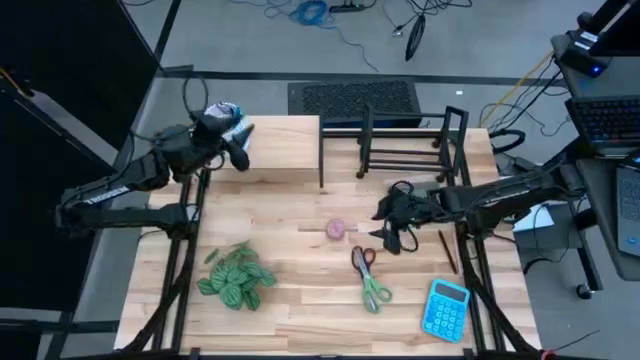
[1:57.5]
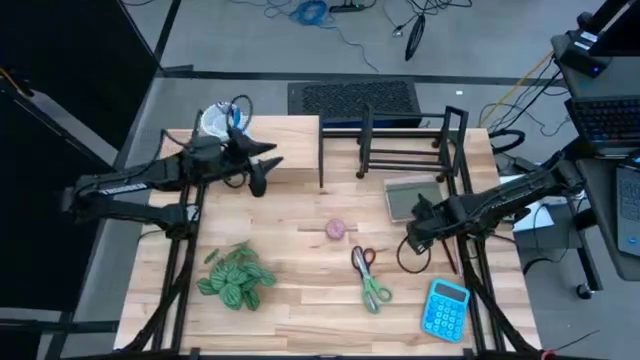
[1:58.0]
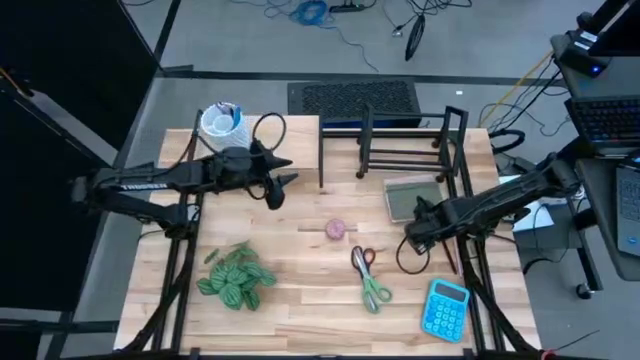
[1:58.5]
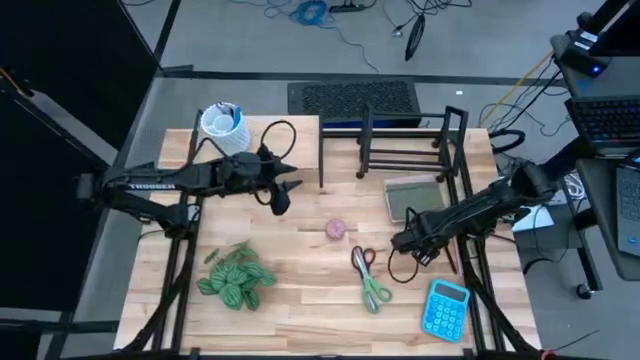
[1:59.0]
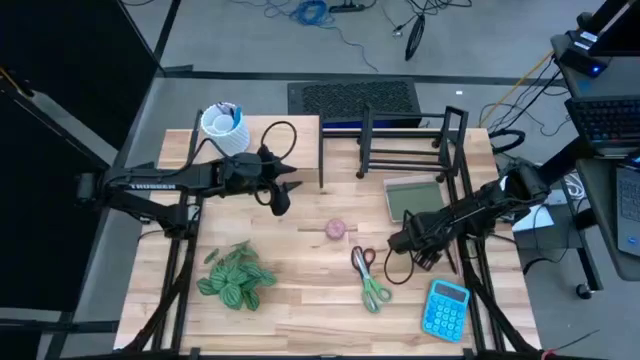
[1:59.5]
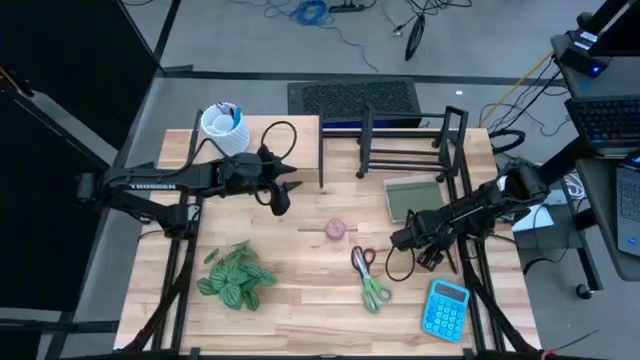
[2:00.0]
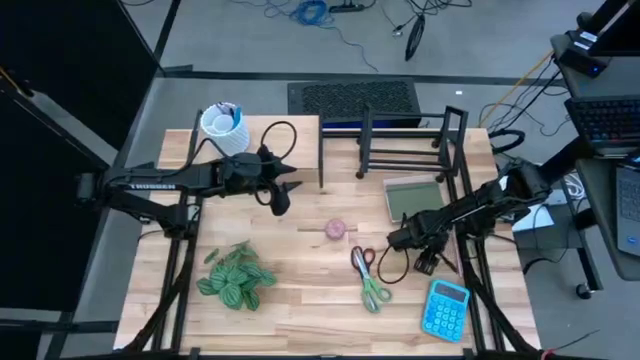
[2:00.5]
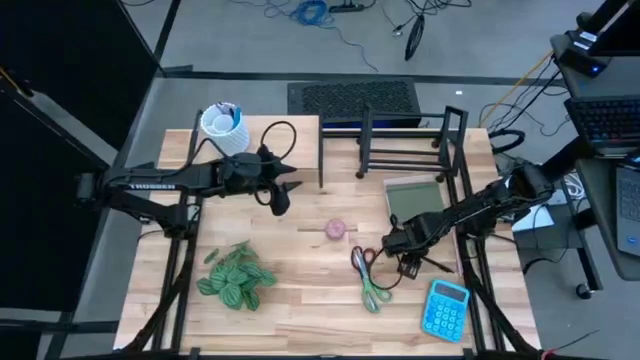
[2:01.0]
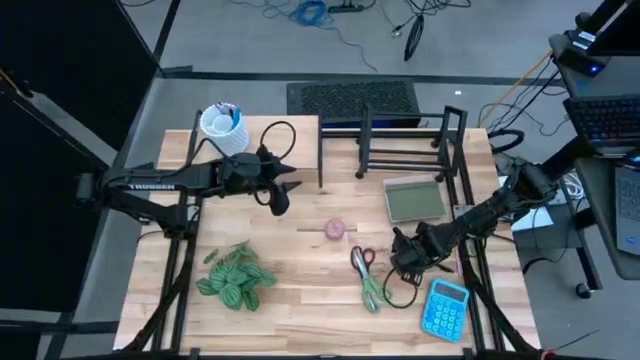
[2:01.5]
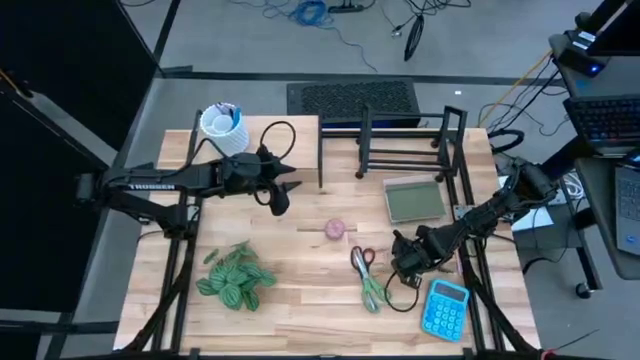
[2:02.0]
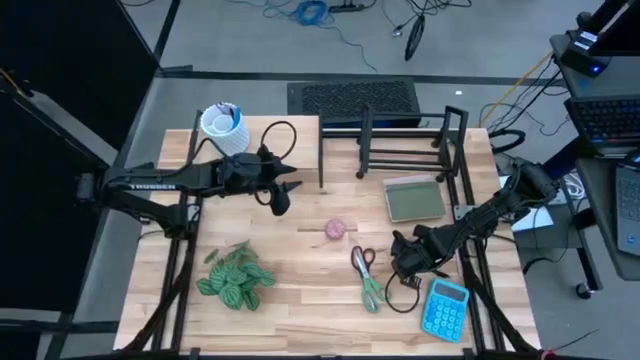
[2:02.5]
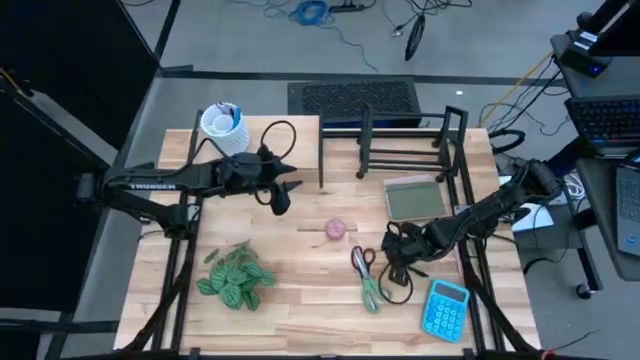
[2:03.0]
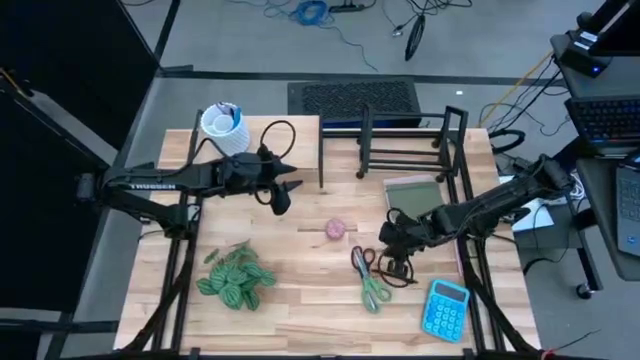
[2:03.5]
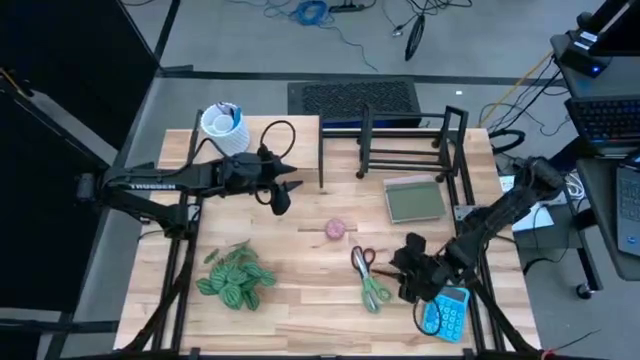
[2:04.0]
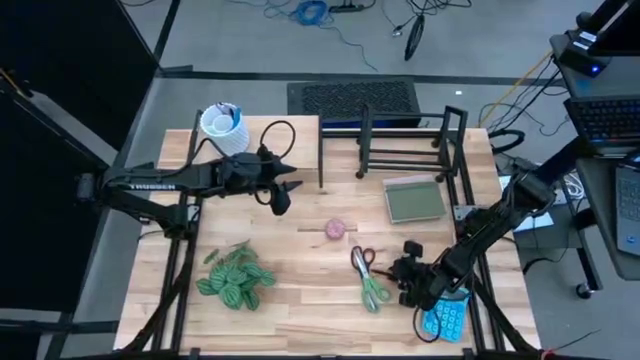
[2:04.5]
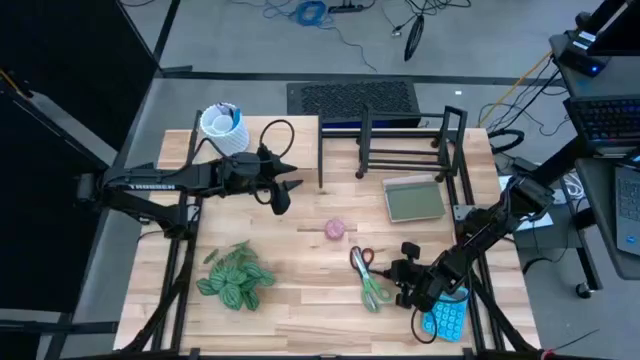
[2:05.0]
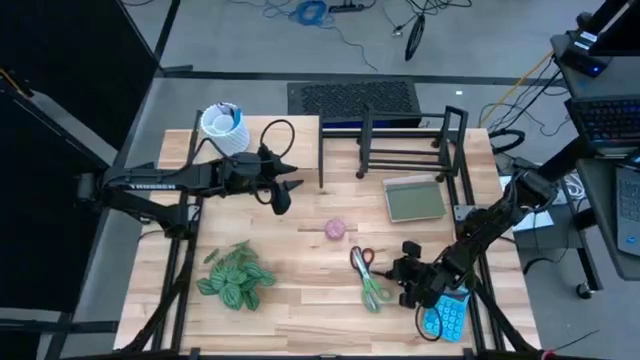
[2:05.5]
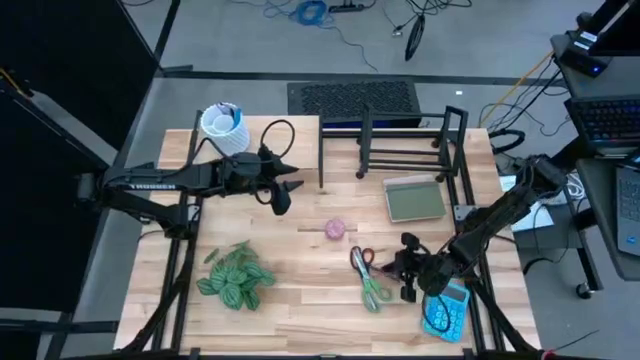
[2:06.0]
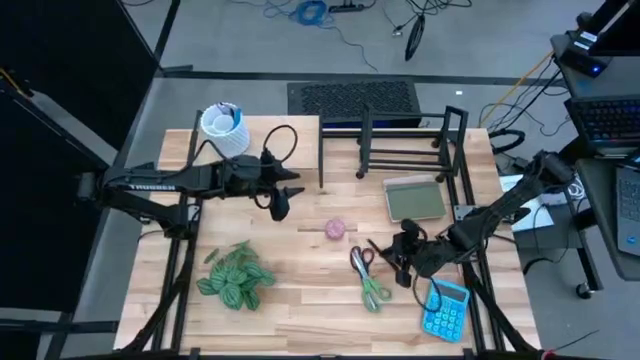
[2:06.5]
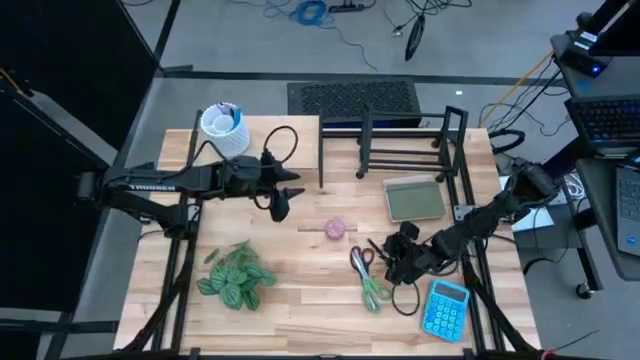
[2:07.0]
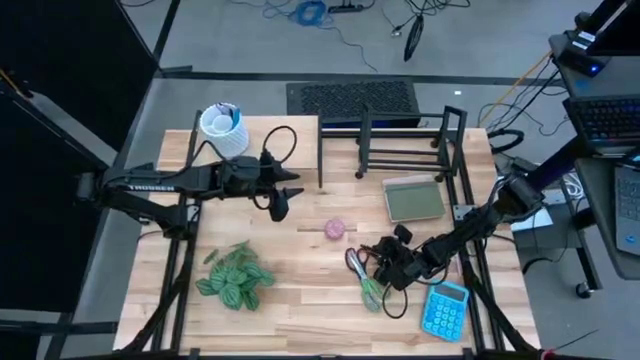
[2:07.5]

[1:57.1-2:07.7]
Task: Stock shelves
Put the black pen into the white pen holder

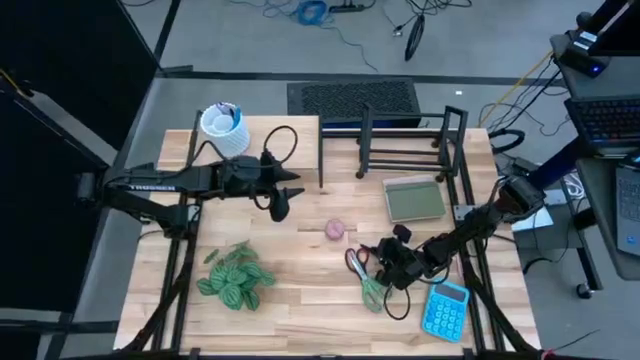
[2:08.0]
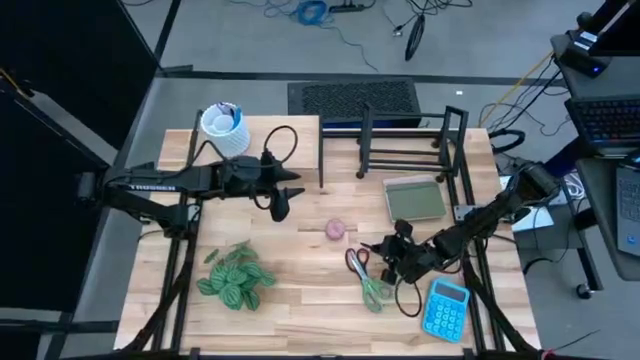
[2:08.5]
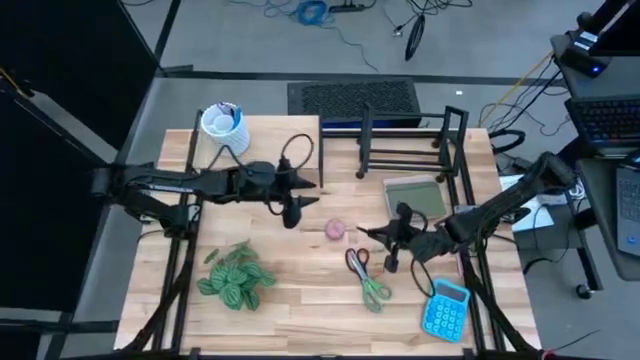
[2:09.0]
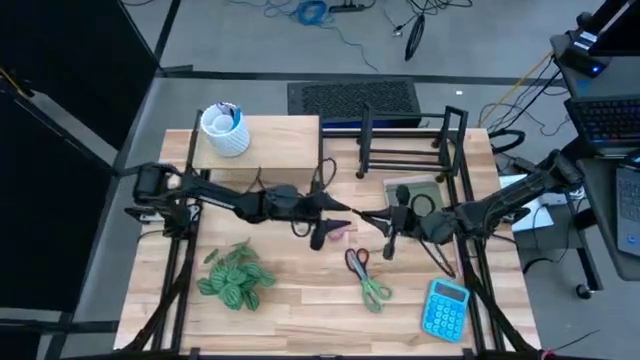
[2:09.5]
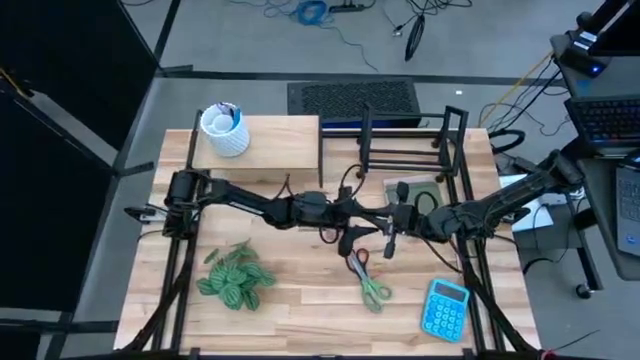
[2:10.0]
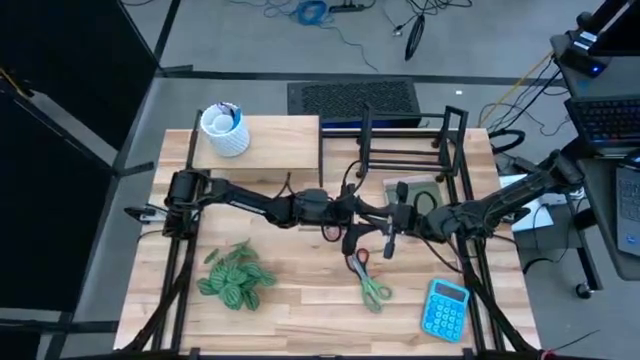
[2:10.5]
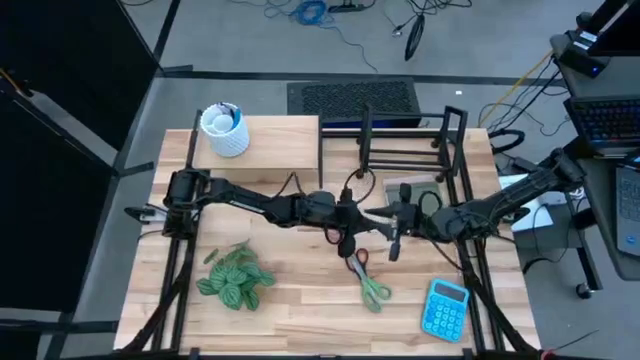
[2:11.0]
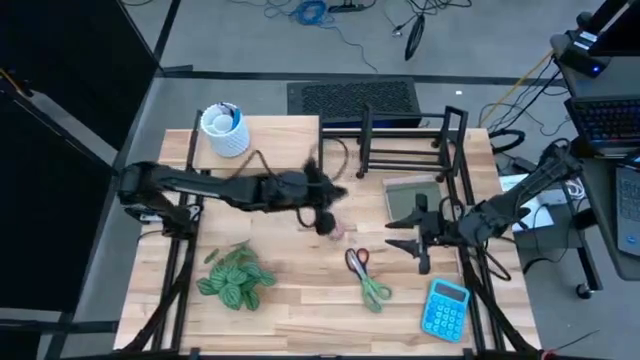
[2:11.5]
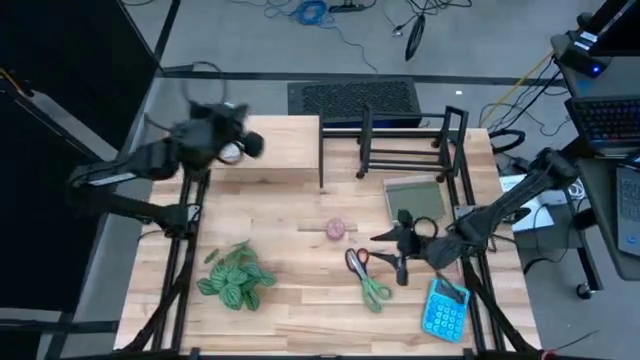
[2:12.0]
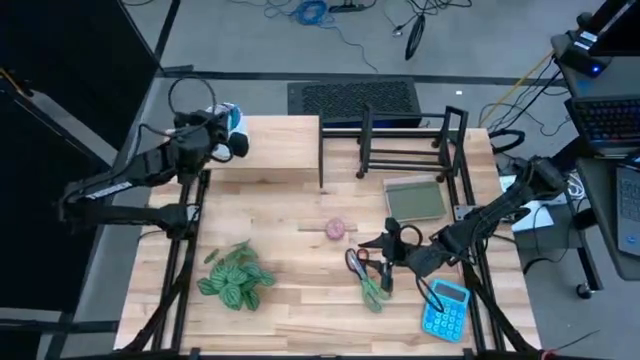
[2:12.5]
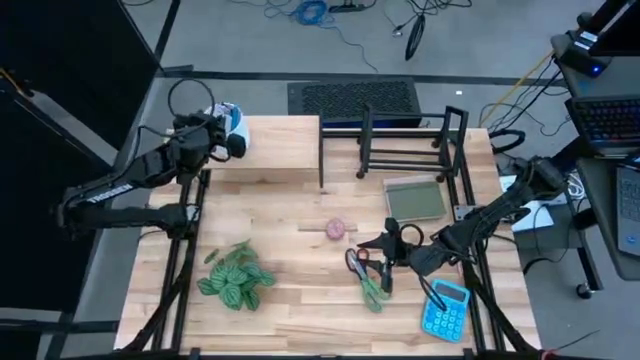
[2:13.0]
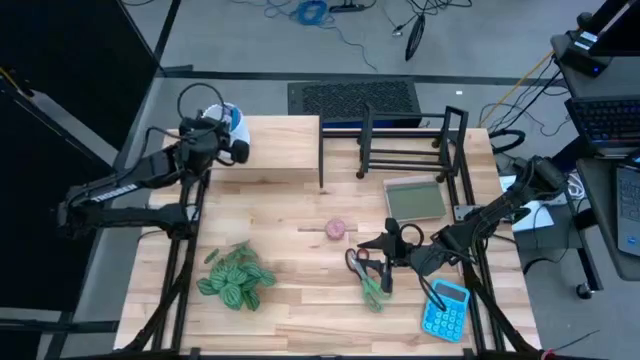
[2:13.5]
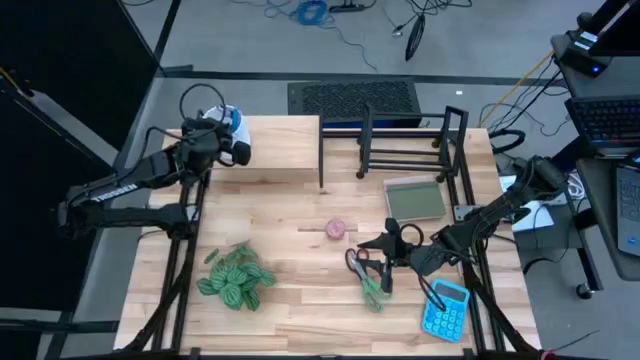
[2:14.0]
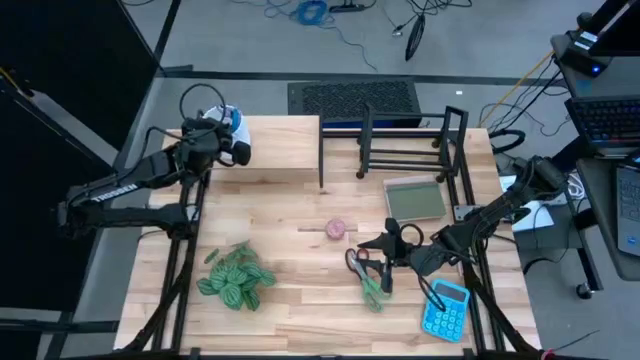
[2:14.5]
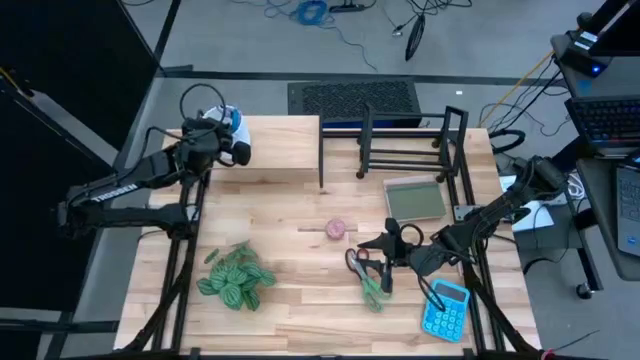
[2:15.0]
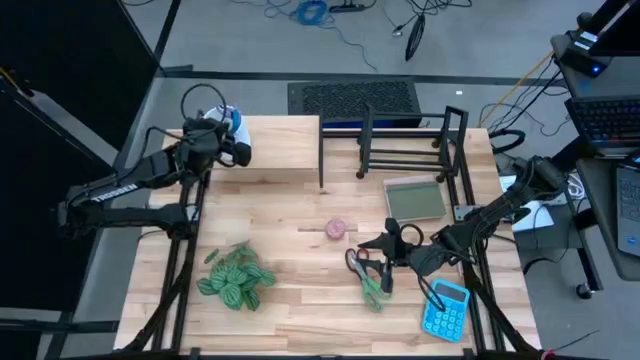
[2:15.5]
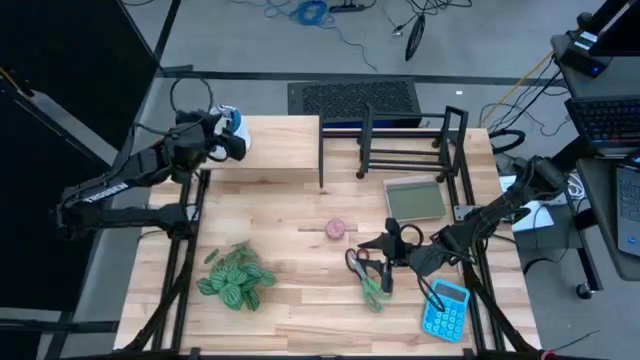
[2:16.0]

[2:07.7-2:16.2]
Put the black pen into the white pen holder

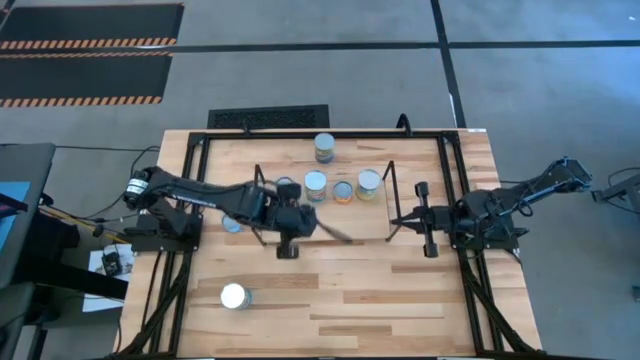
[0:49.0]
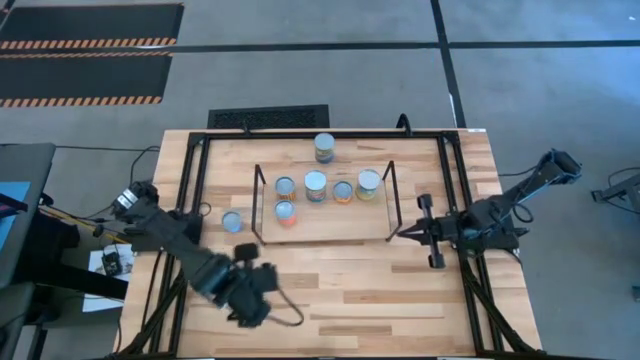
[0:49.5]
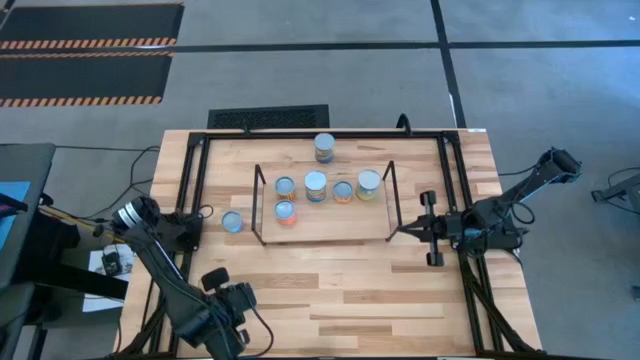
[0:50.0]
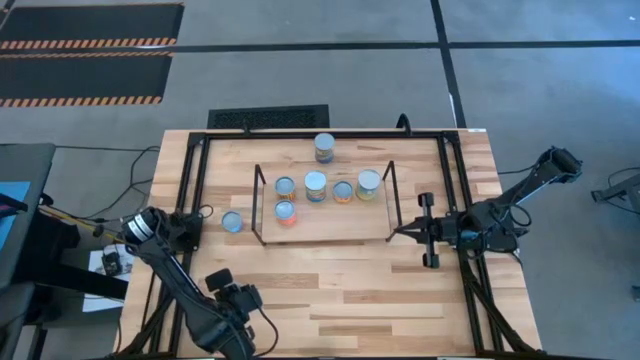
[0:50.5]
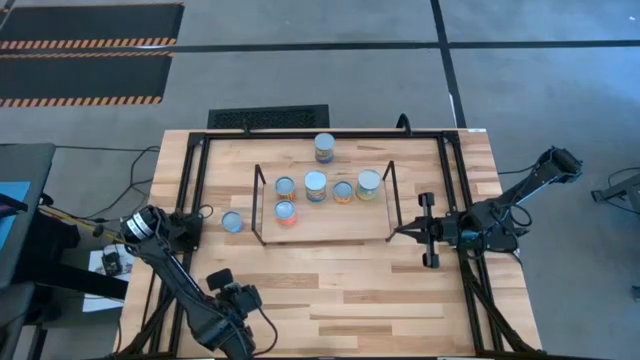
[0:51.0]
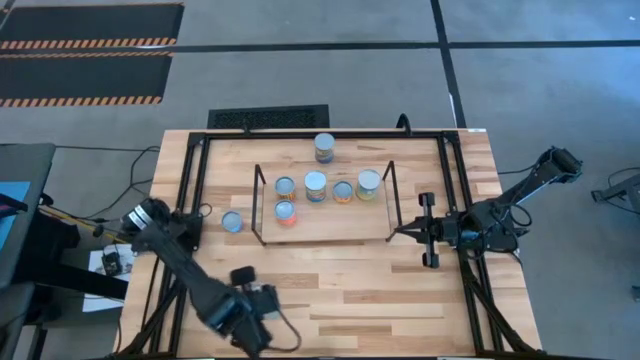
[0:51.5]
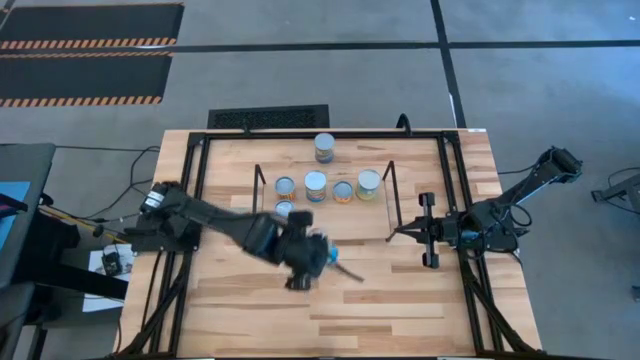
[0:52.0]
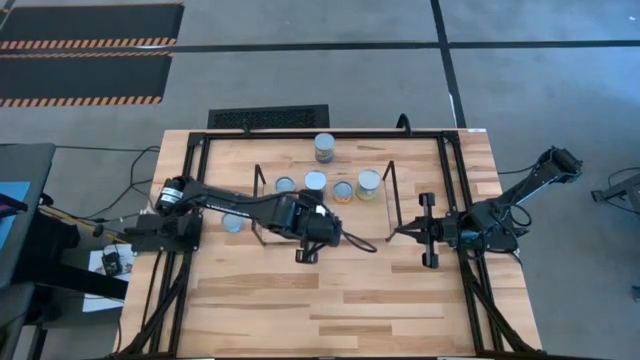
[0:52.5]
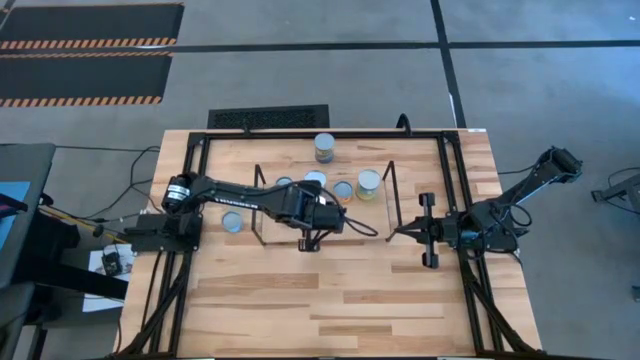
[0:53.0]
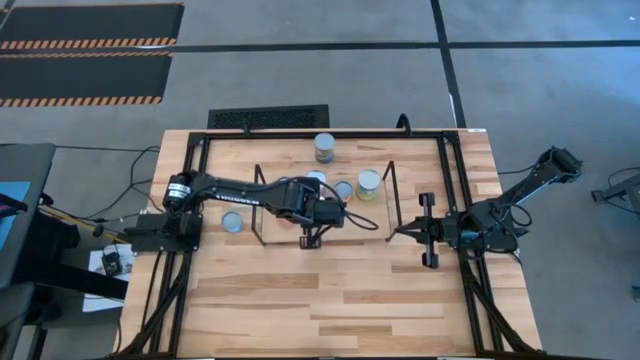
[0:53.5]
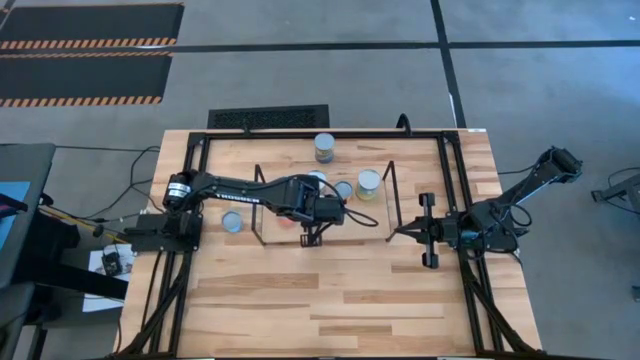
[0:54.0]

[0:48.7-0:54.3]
Task: Pick and place cans onto a shelf
Put the tomatoes can on the shelf aligned with the other tomatoes can
